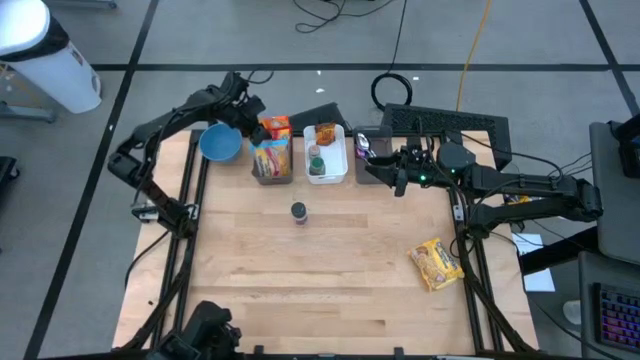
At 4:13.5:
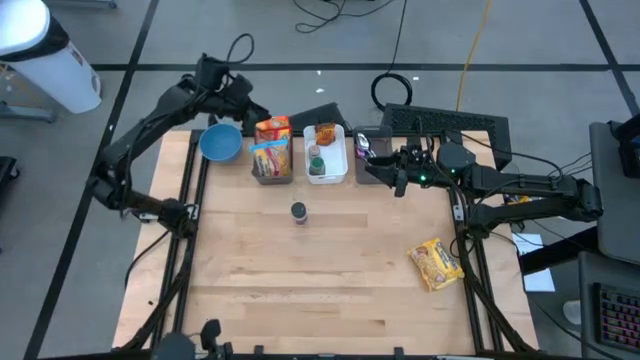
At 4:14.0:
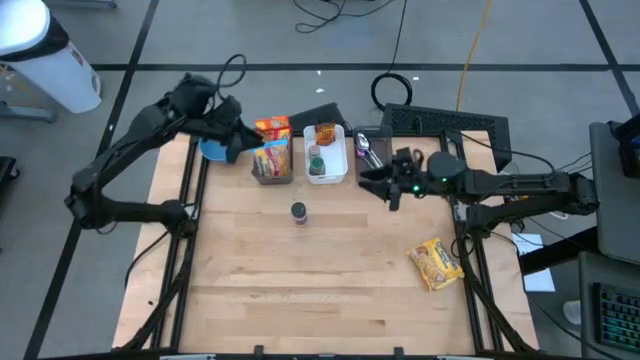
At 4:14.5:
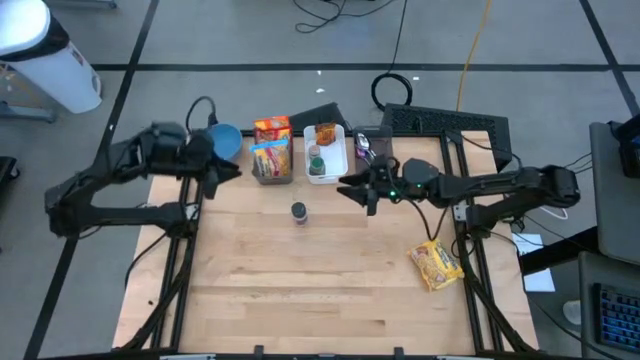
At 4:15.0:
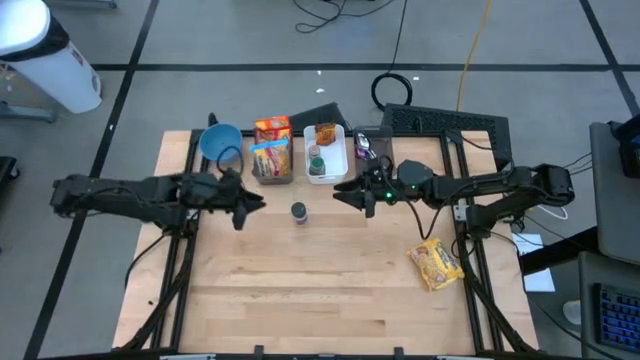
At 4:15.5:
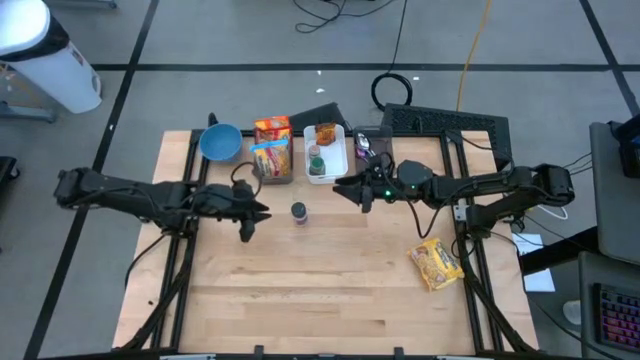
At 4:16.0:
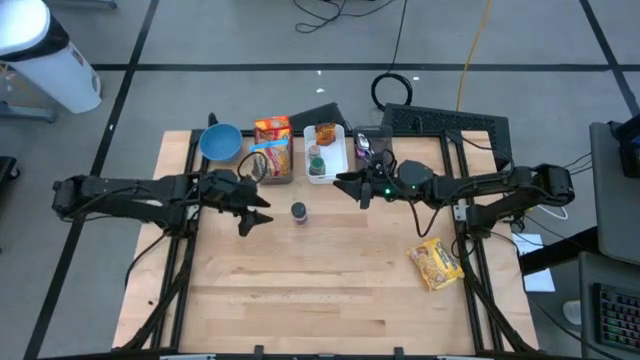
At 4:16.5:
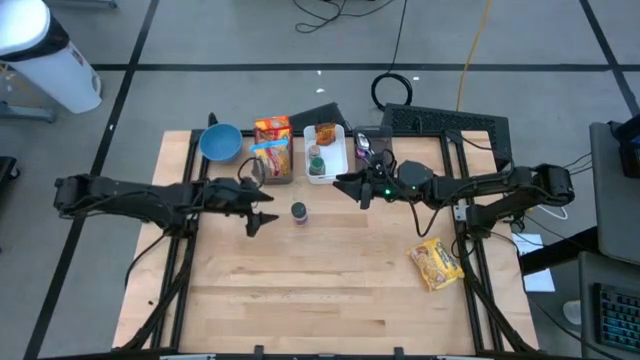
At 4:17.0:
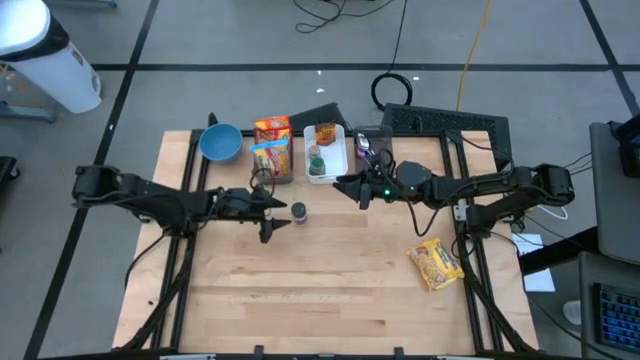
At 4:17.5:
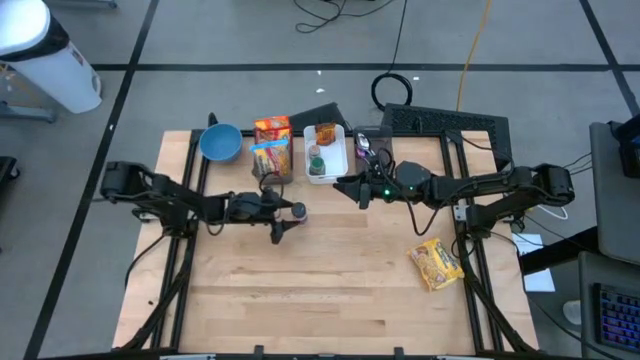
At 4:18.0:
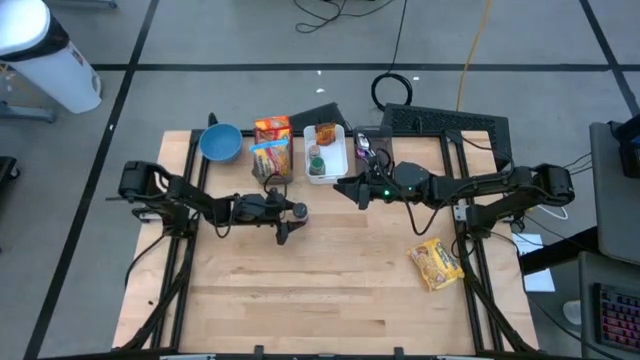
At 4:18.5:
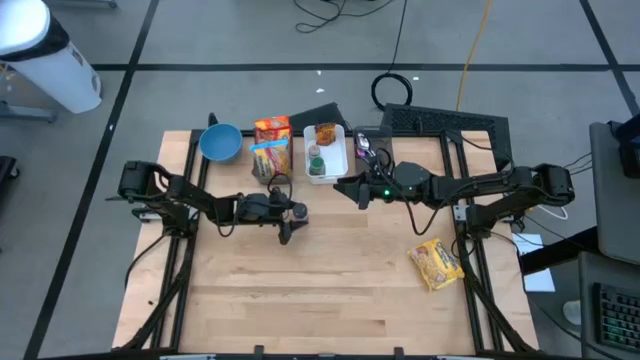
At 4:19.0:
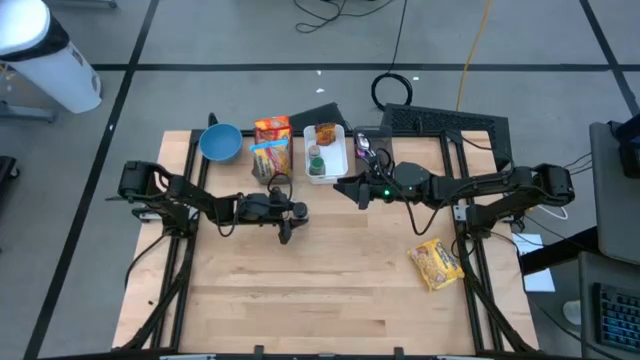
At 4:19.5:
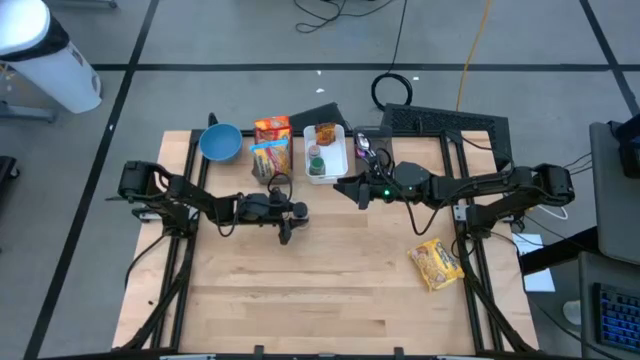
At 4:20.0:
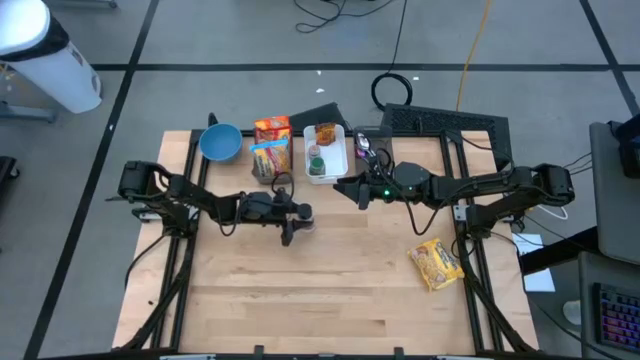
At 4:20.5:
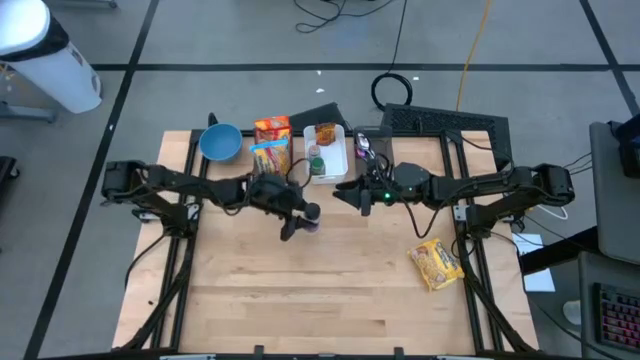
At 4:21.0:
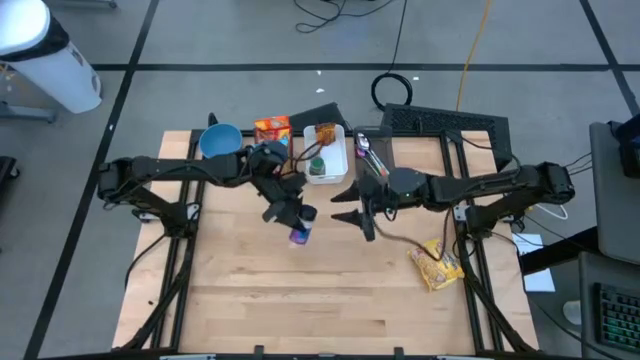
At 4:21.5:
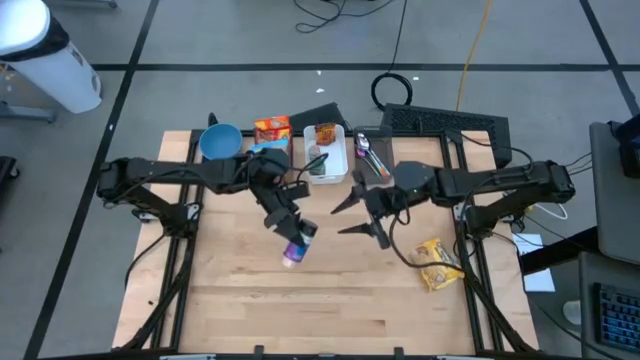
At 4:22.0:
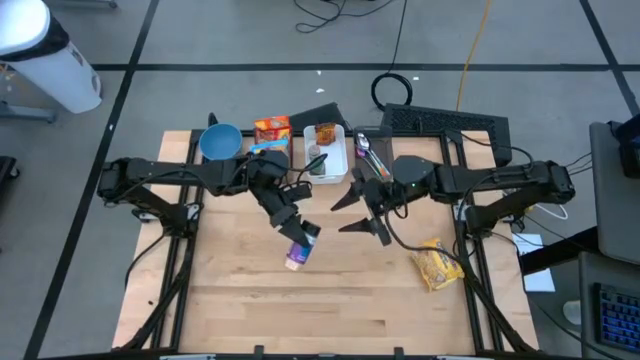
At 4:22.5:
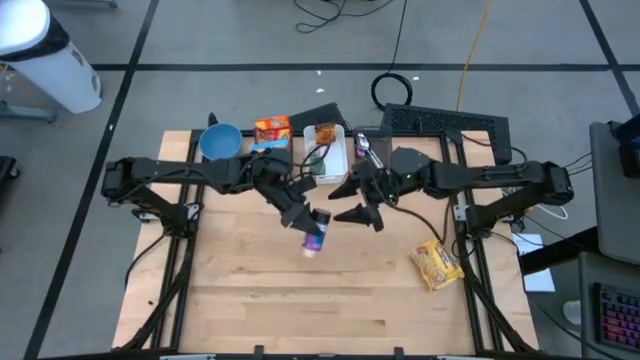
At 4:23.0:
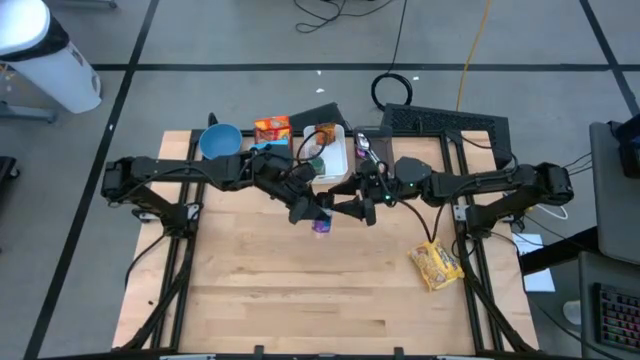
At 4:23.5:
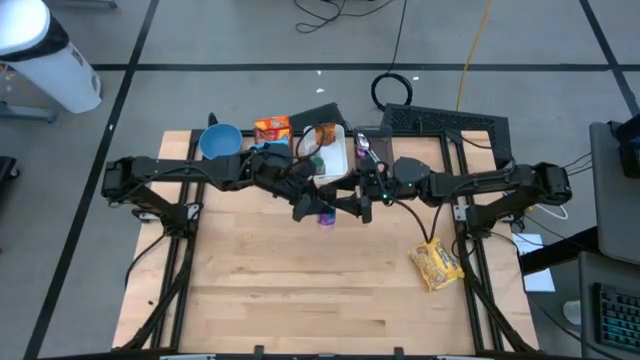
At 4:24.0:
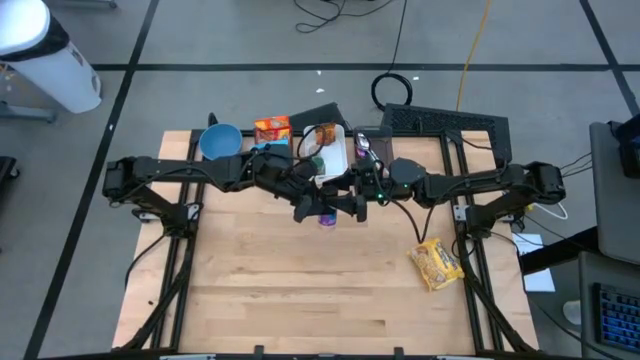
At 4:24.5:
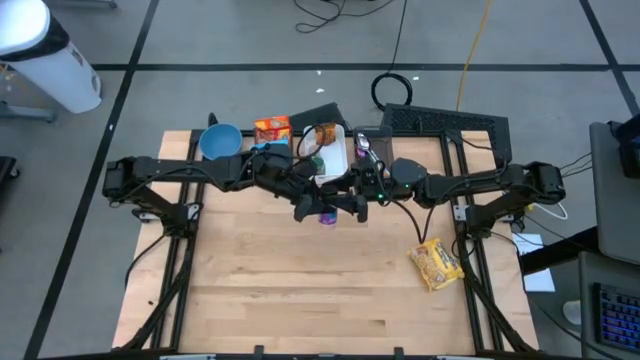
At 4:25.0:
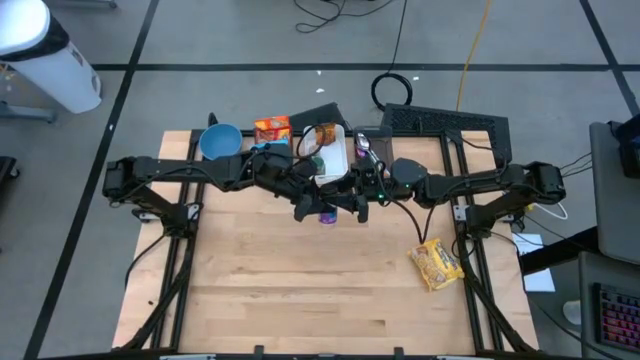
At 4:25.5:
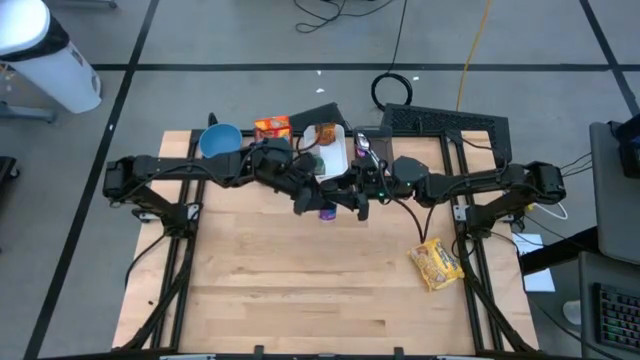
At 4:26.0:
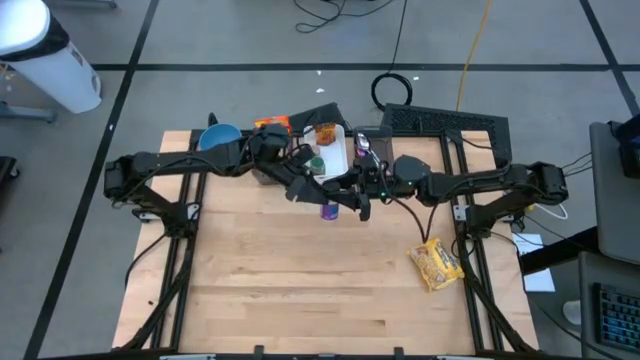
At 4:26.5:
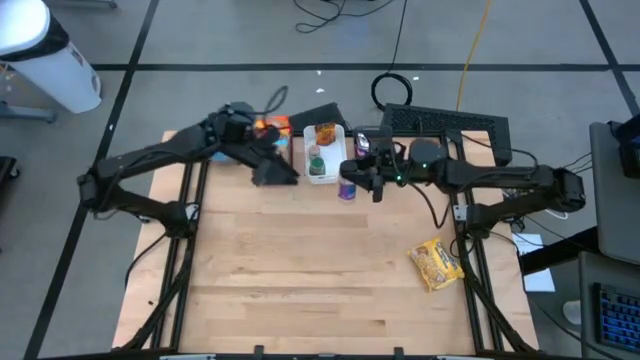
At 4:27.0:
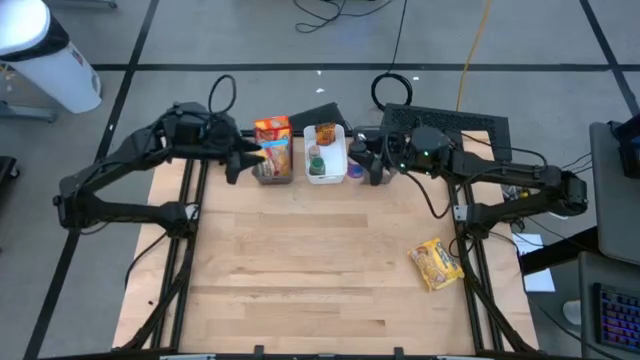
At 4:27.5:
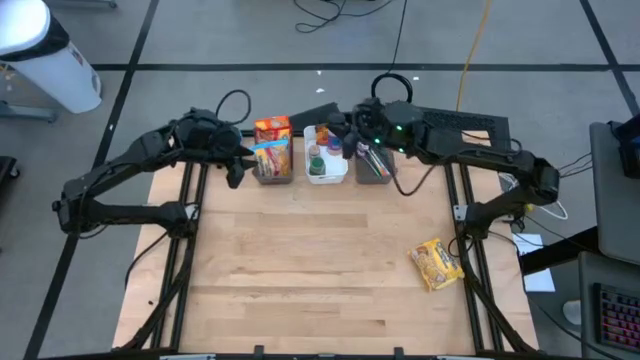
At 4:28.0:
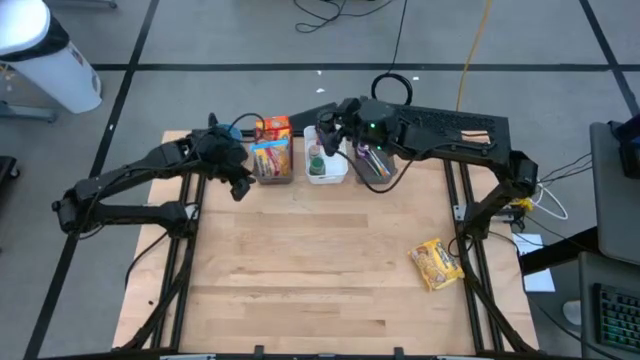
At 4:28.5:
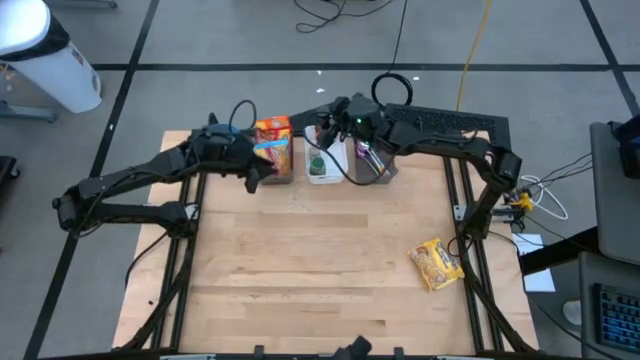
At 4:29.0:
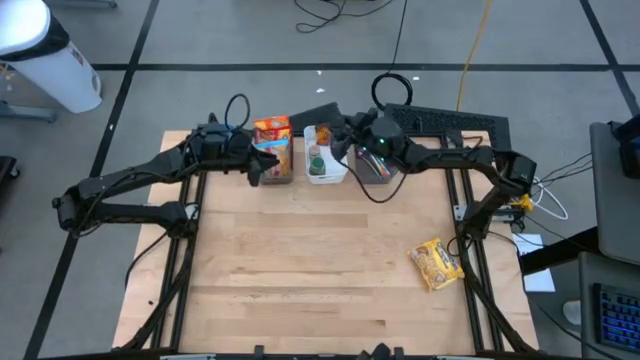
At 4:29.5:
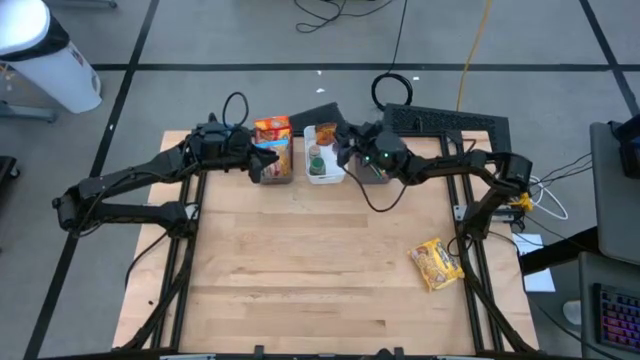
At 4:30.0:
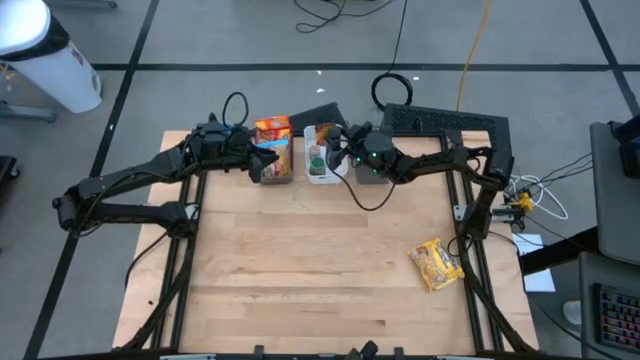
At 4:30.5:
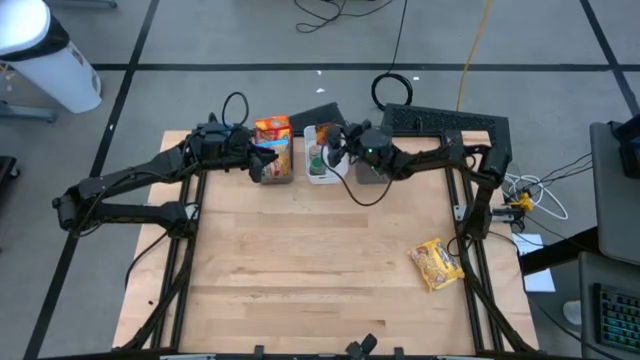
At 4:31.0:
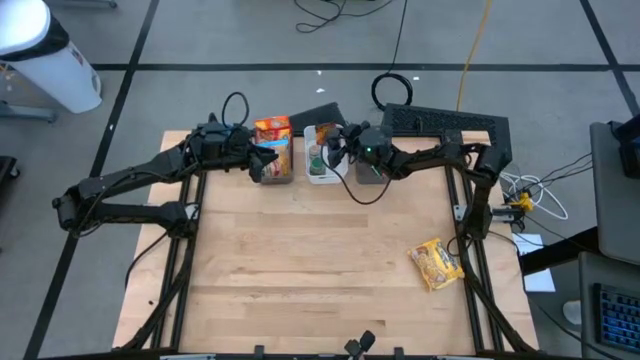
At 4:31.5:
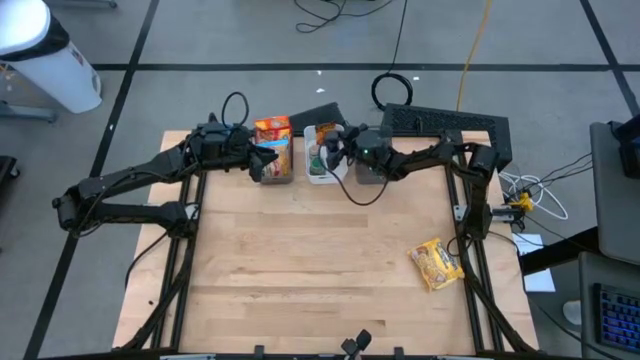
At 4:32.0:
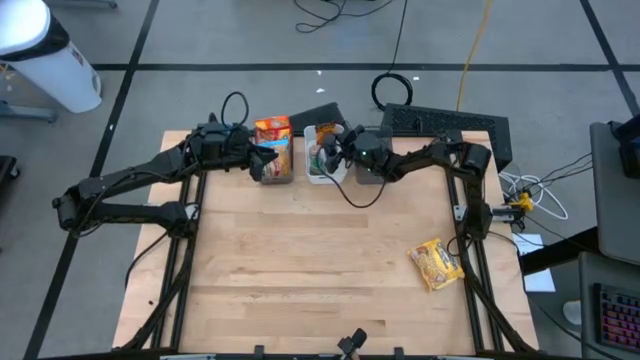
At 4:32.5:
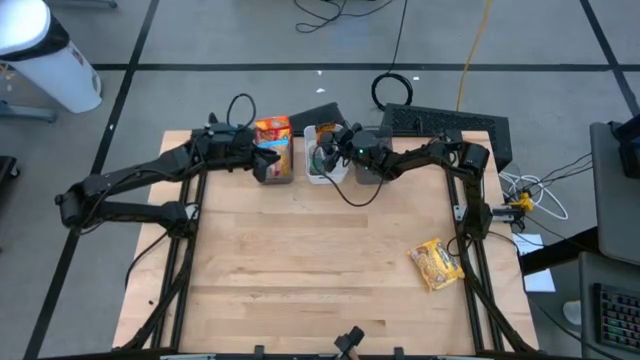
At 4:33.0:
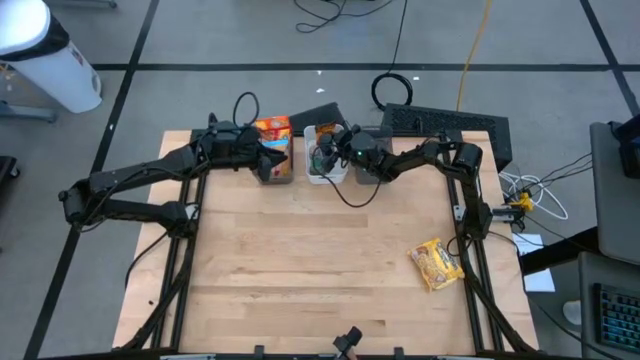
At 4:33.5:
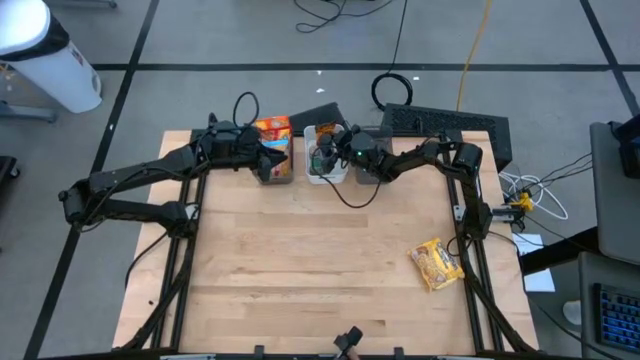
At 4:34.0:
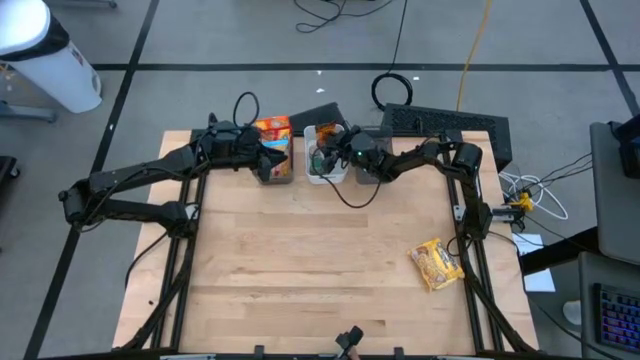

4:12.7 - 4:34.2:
Task: Pick & Place Food Item
Put the black seasoning bottle into the white bin
